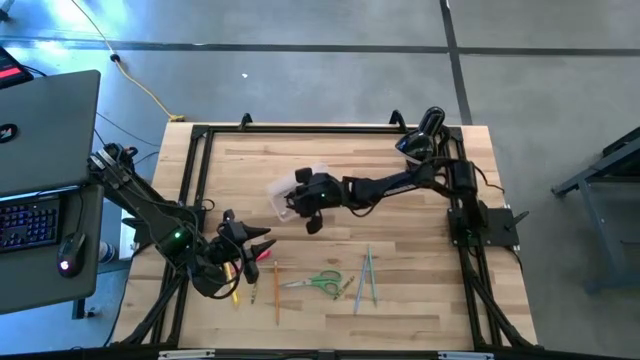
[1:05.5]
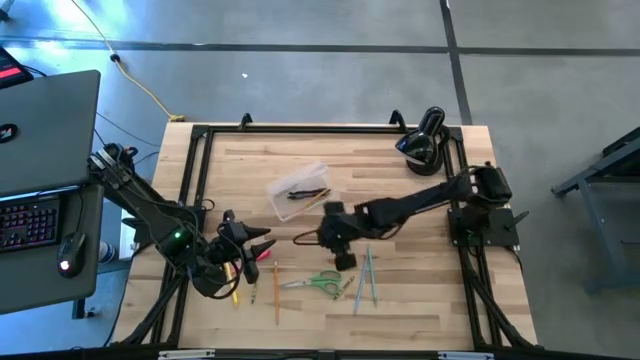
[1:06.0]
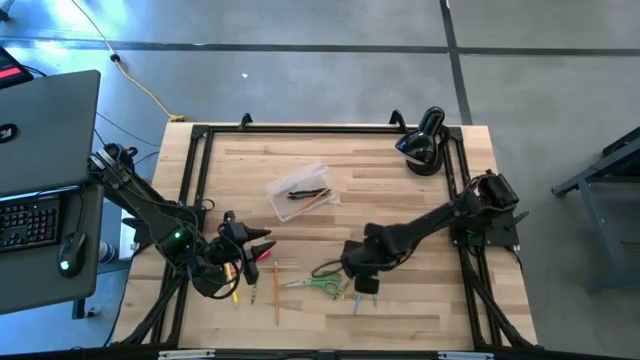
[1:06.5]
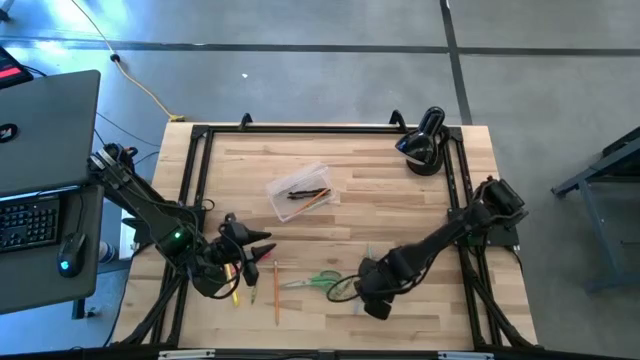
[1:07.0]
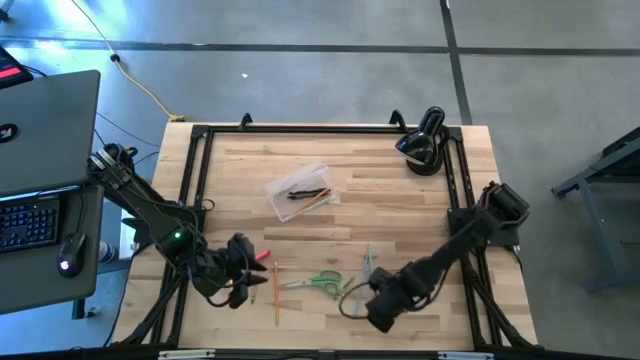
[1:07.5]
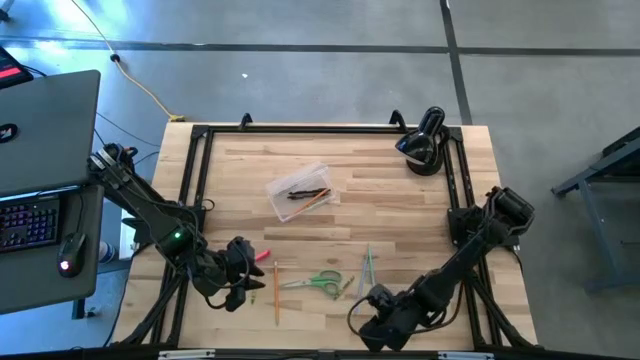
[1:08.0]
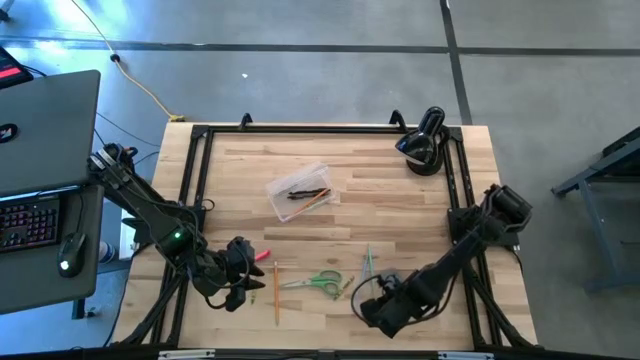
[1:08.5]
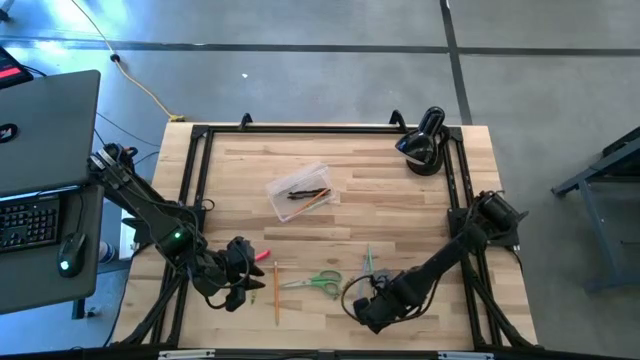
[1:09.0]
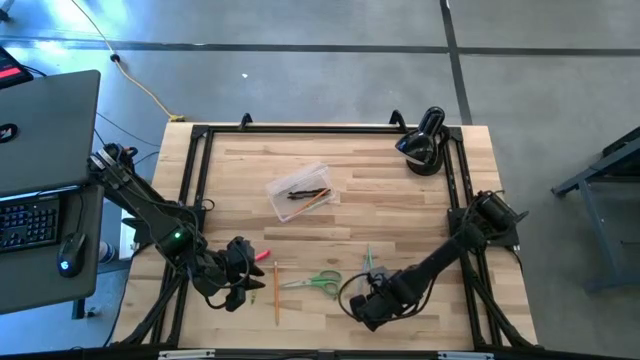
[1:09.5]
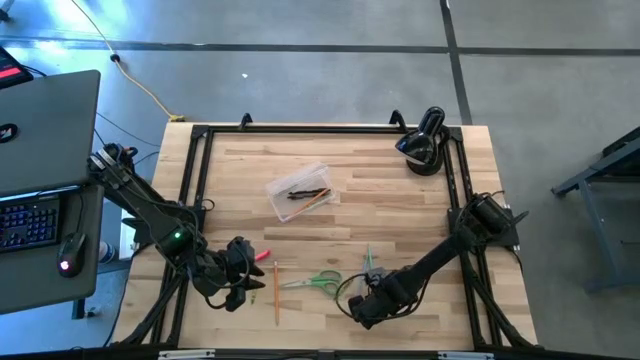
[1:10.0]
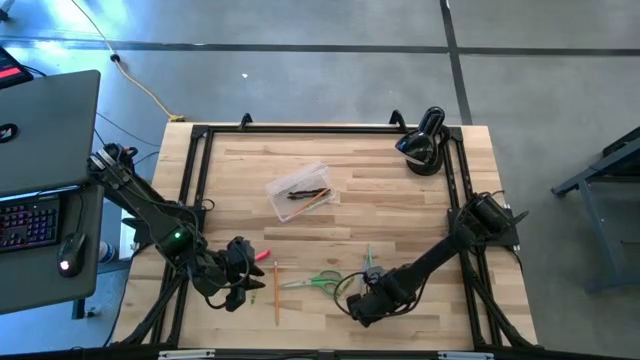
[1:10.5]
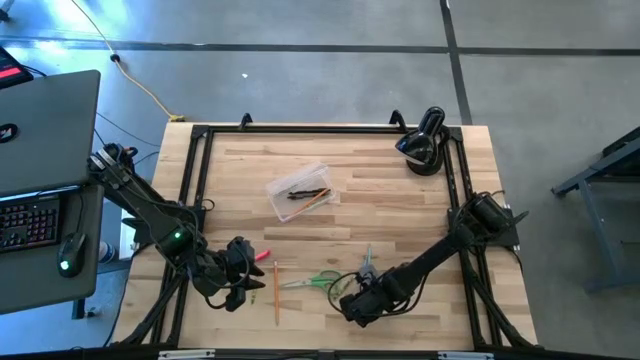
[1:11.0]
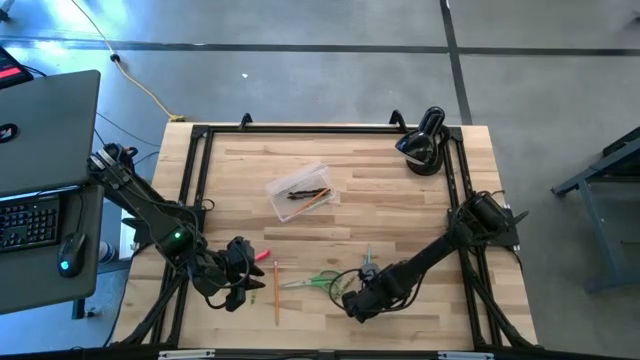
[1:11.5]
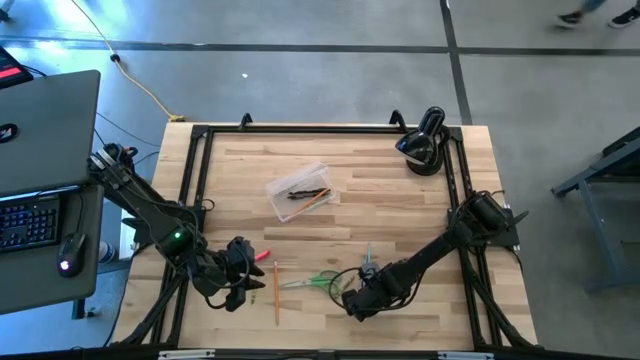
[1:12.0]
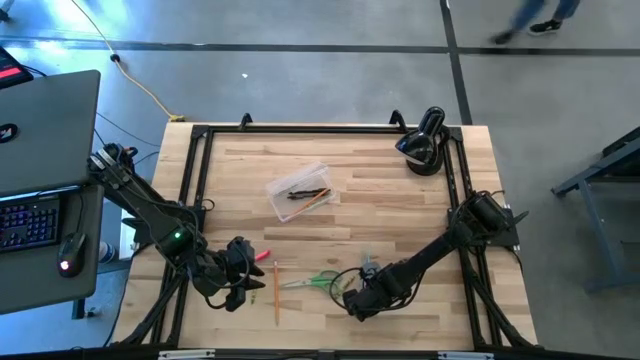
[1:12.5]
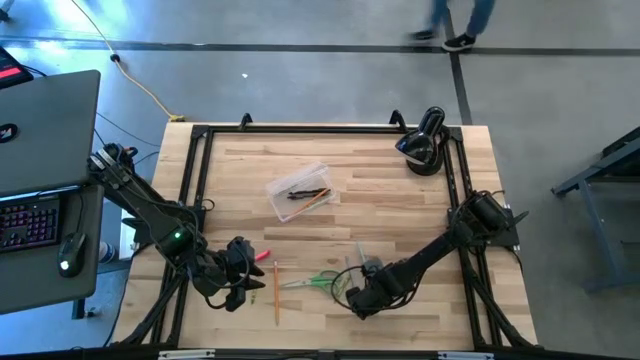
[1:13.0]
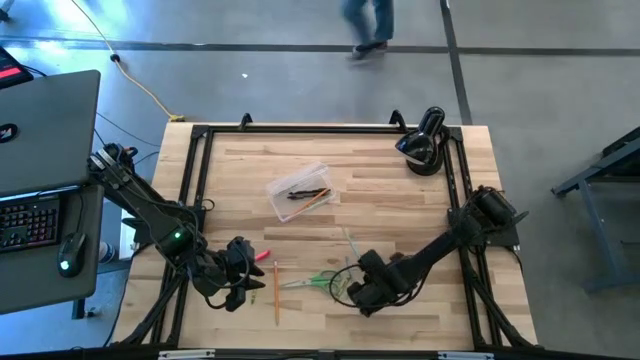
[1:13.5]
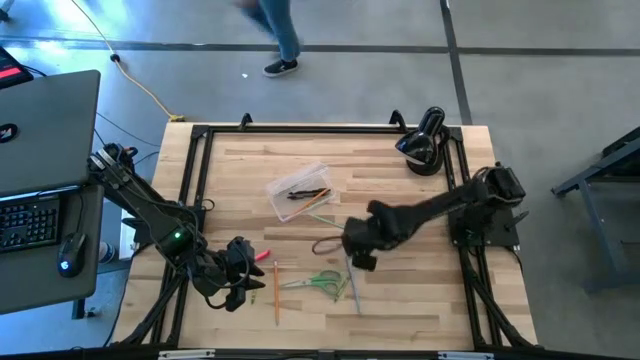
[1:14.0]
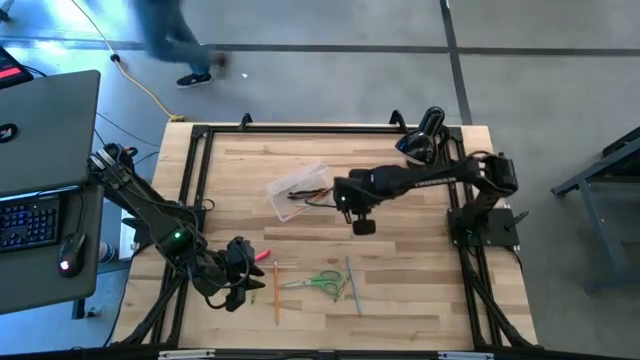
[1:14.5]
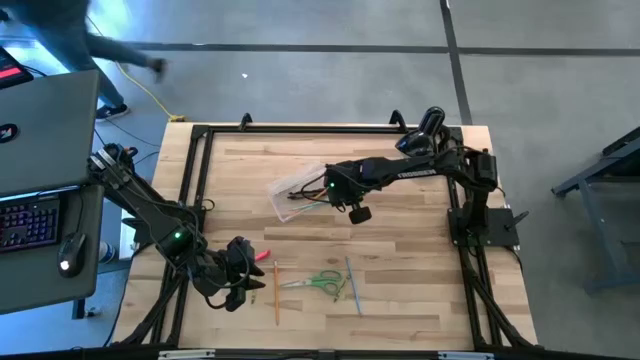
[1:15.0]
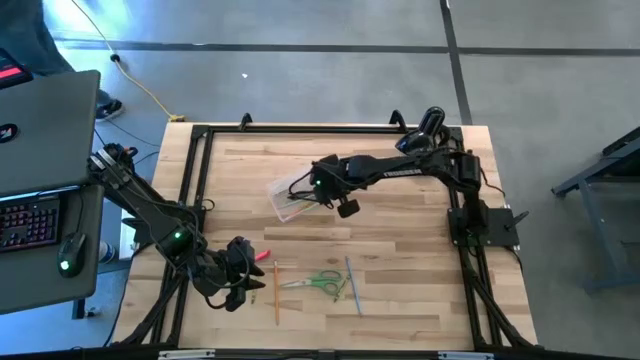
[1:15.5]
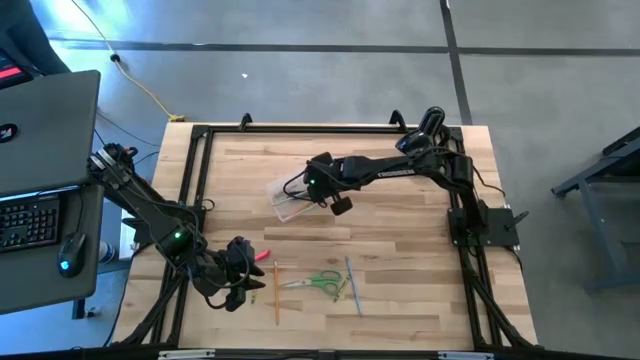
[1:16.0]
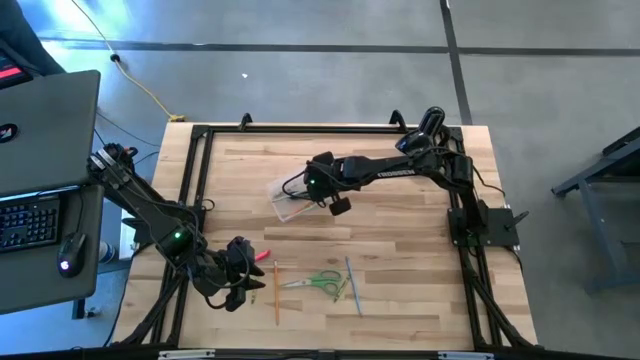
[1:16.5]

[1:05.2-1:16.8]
Task: Pick & place school supplies into a supply box
Put the right blue pencil into the supply box

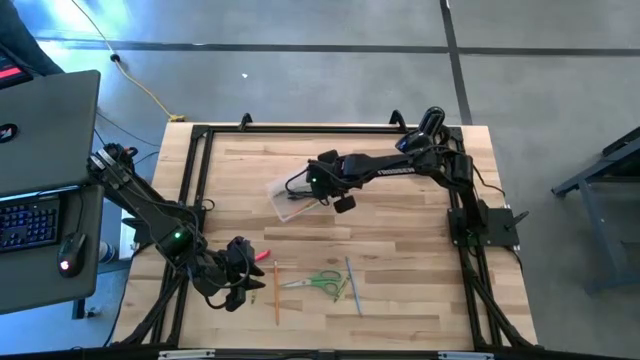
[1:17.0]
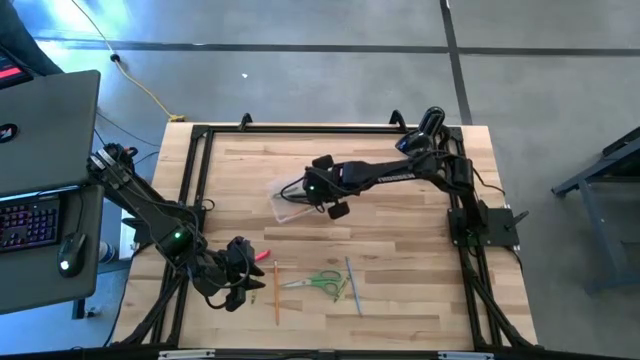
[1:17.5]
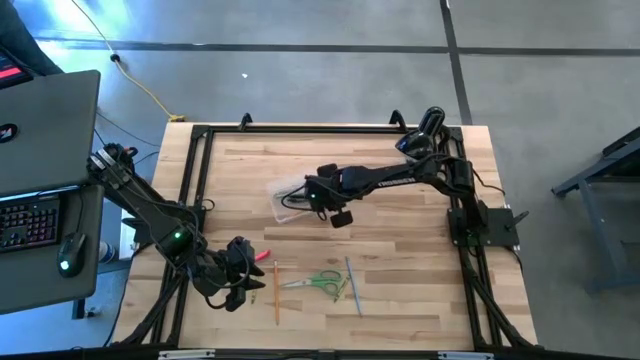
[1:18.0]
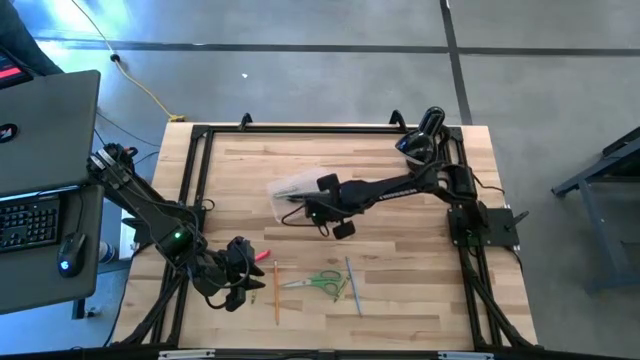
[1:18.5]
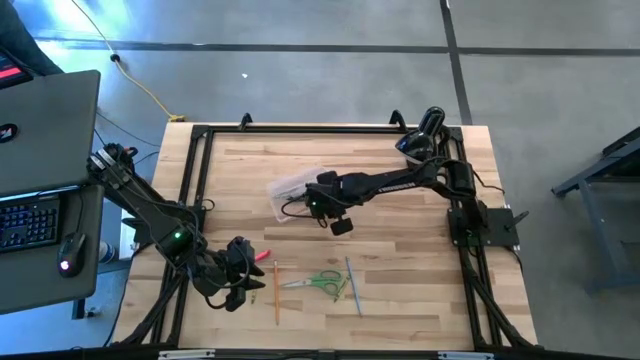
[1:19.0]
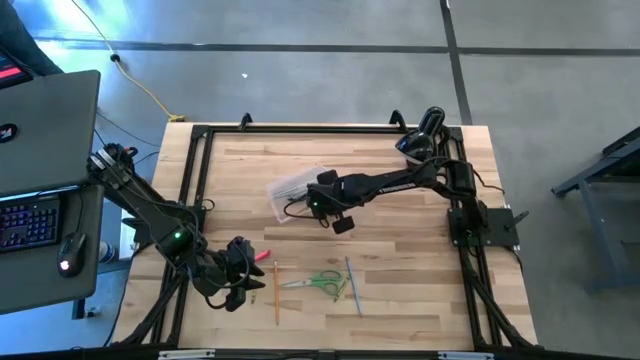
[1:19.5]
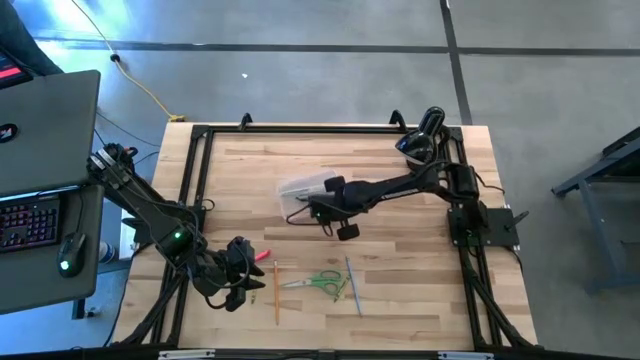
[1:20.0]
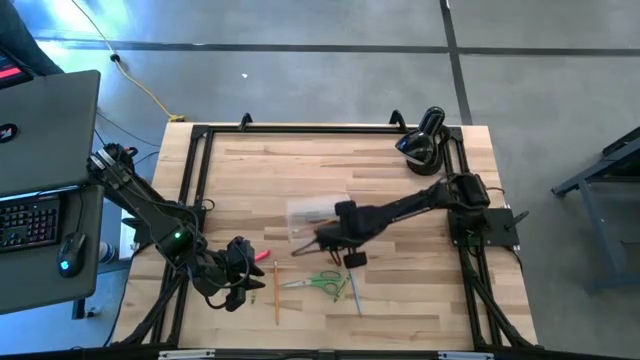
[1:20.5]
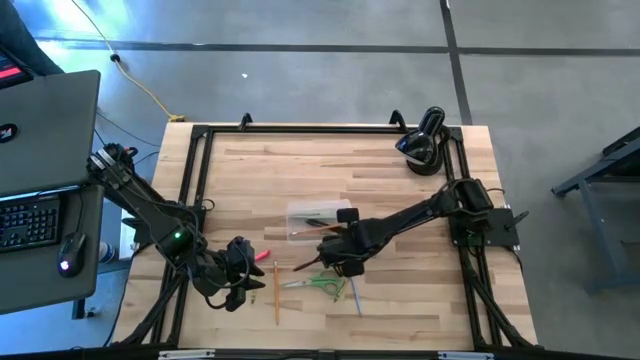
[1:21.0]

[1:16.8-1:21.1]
Adjust the supply box

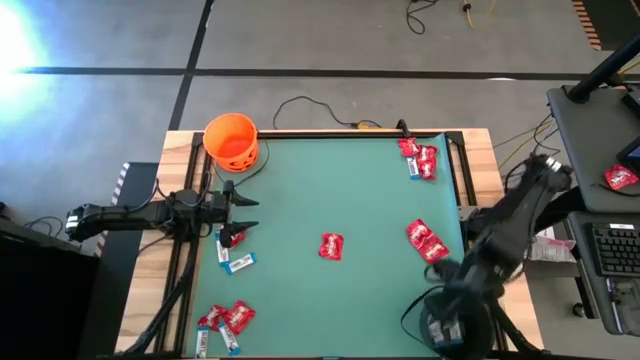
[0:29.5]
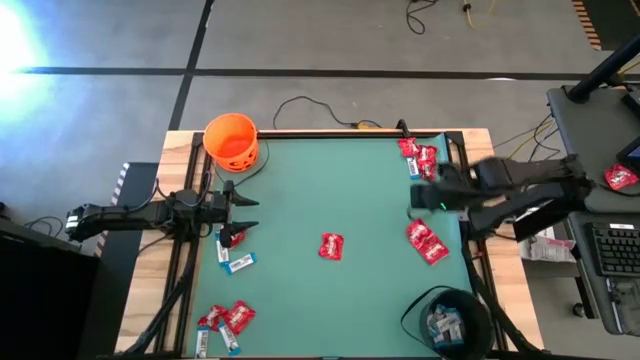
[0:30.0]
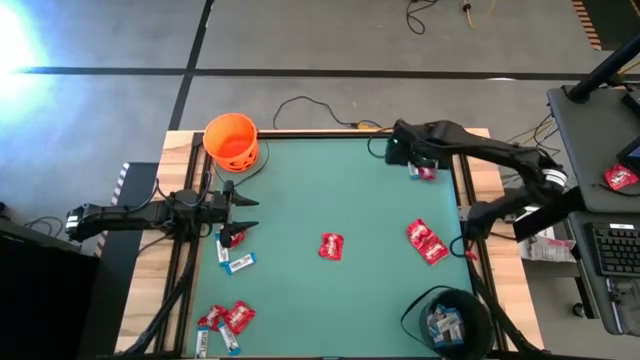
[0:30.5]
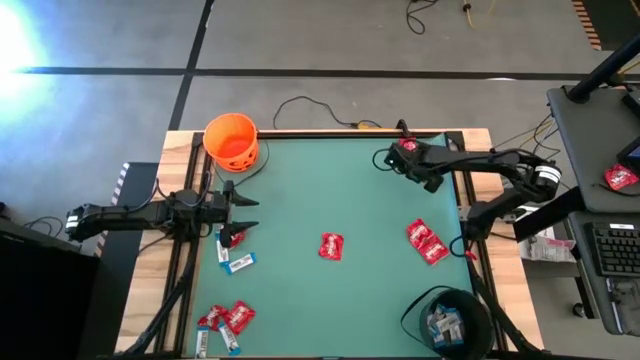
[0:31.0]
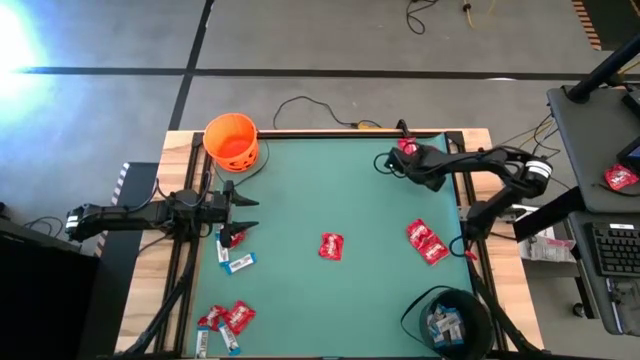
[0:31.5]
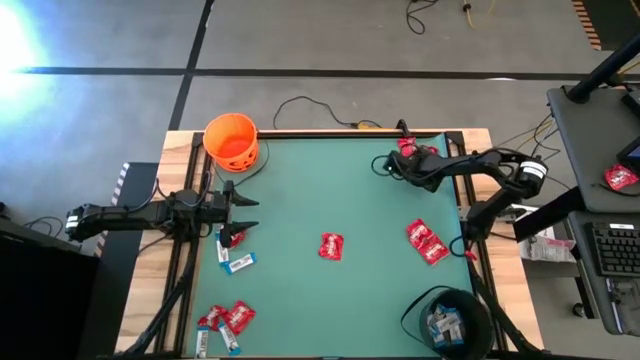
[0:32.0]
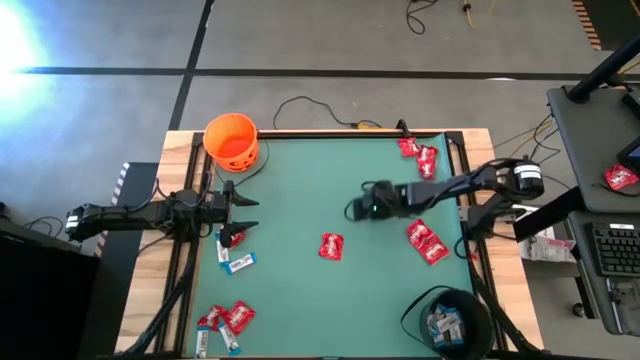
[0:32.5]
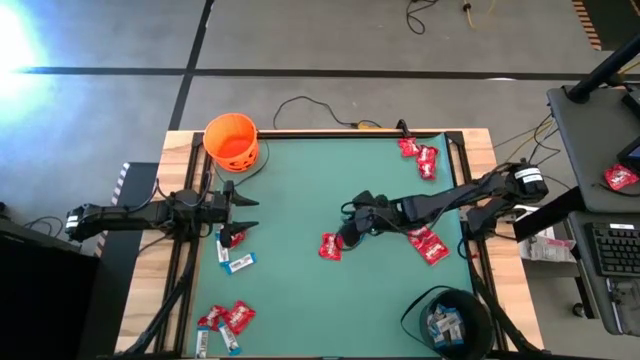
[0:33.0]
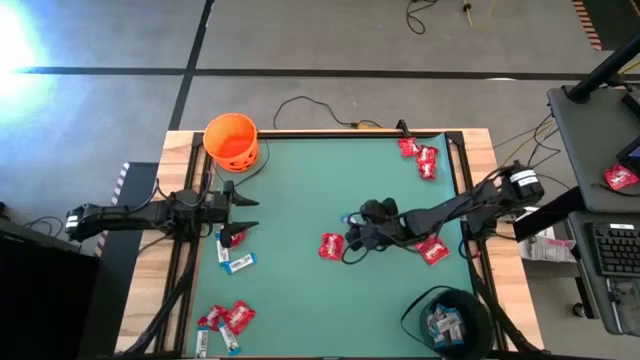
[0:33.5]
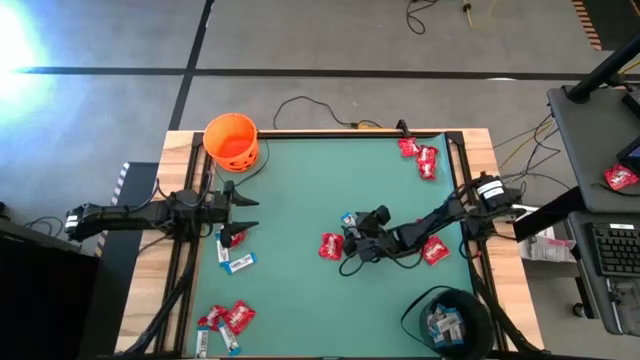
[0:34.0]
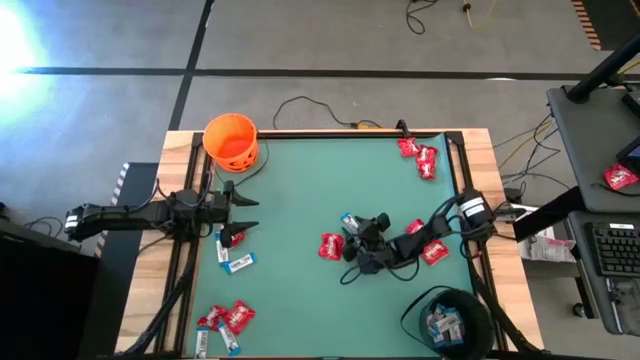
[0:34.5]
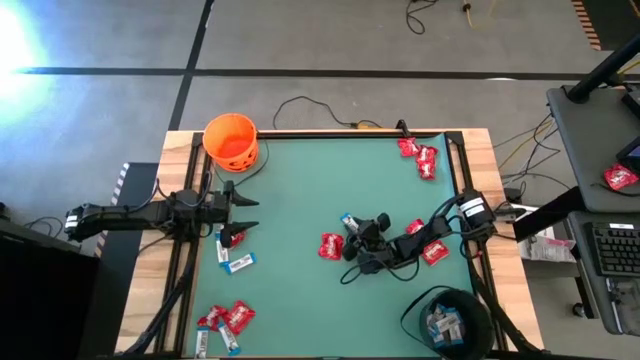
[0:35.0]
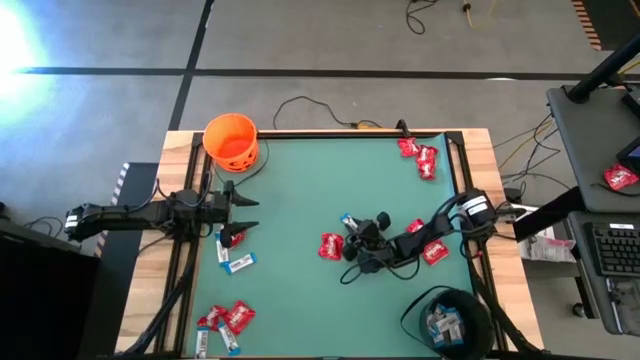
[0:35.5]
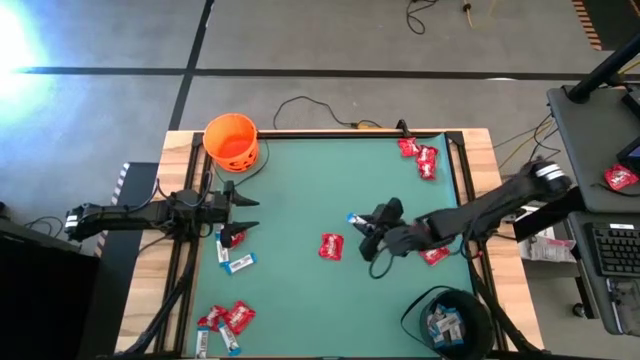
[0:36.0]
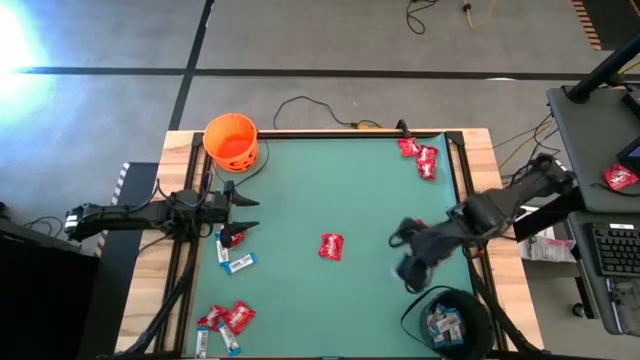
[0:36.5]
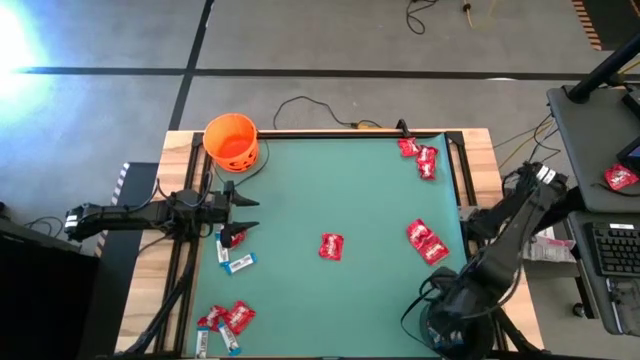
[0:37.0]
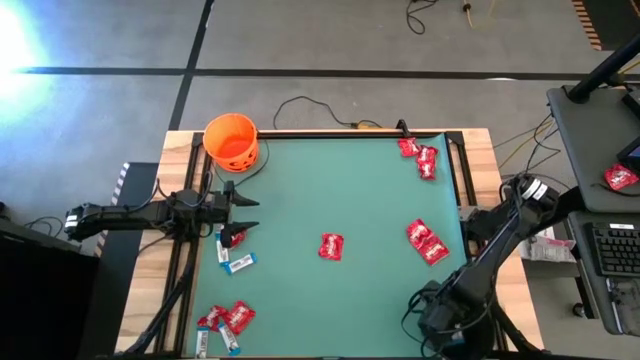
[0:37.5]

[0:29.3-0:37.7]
Task: Sort candy by brand, put in halloween buckets
Put the white chocolate into the black bucket
